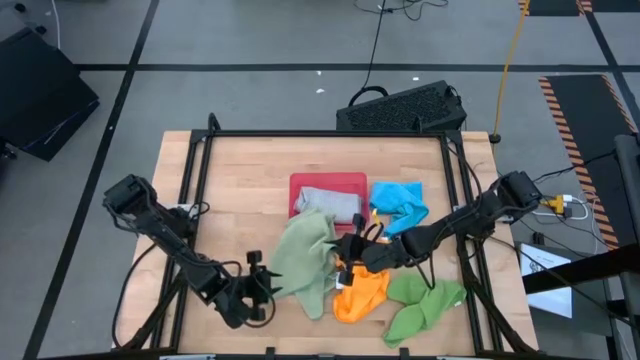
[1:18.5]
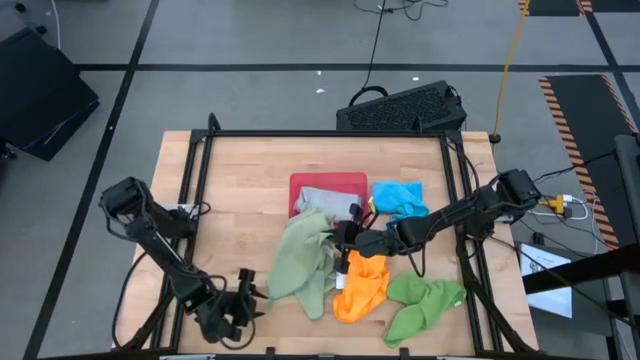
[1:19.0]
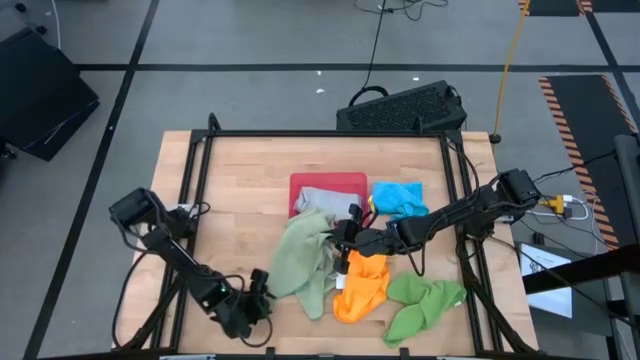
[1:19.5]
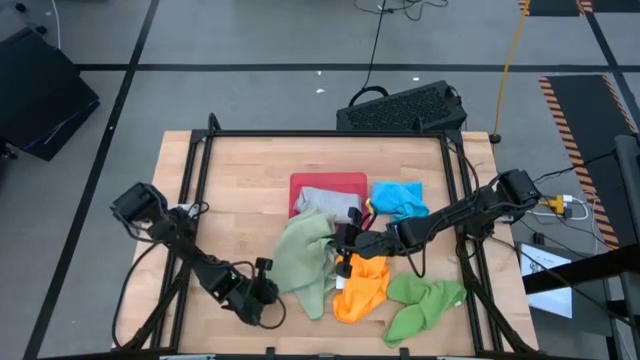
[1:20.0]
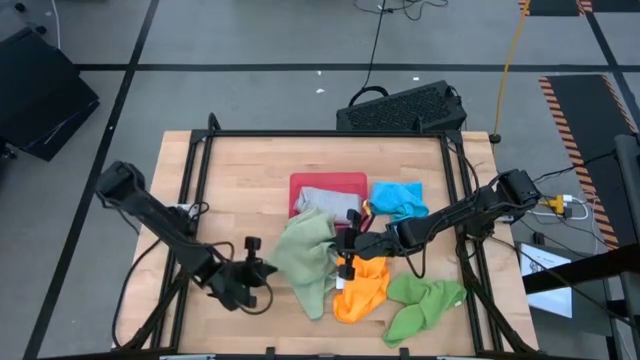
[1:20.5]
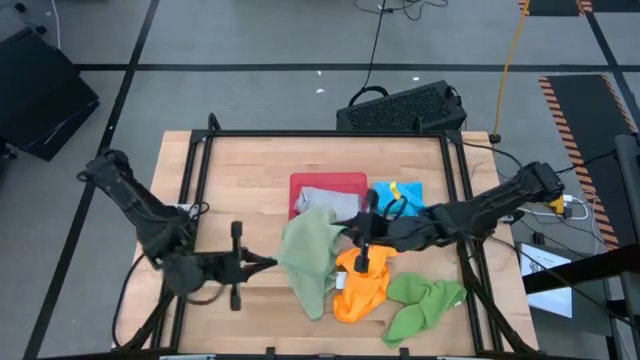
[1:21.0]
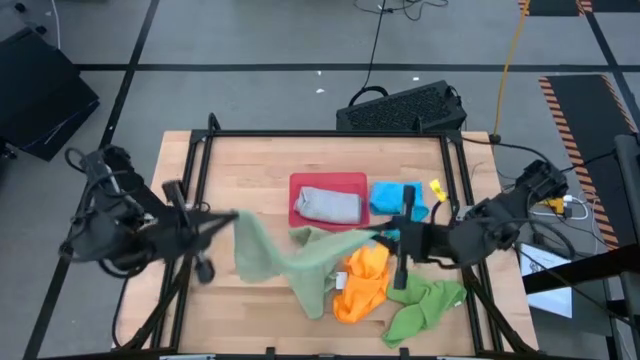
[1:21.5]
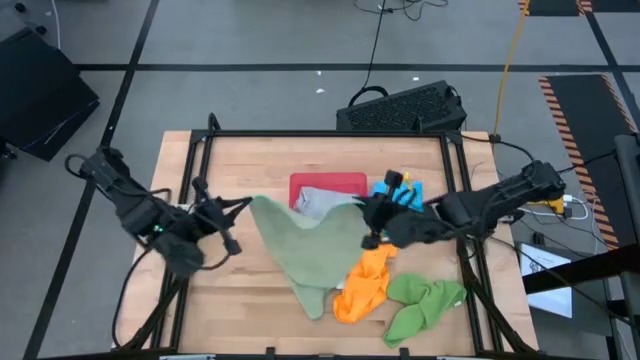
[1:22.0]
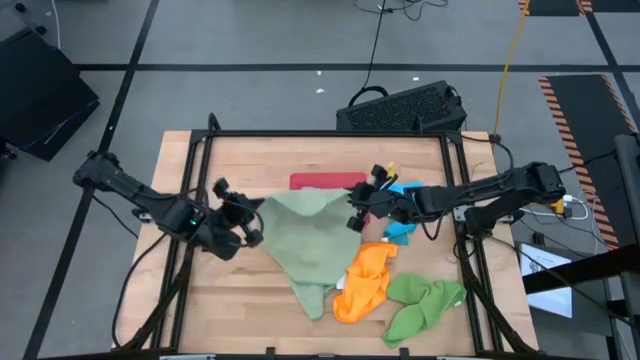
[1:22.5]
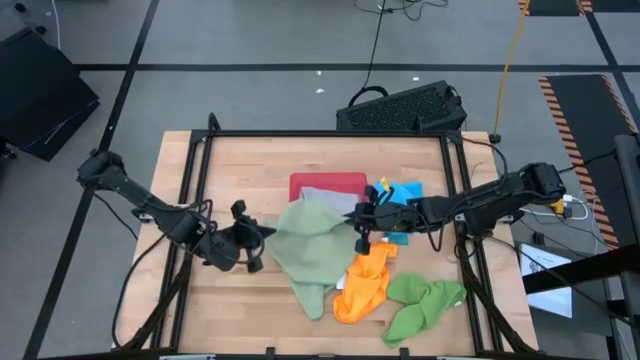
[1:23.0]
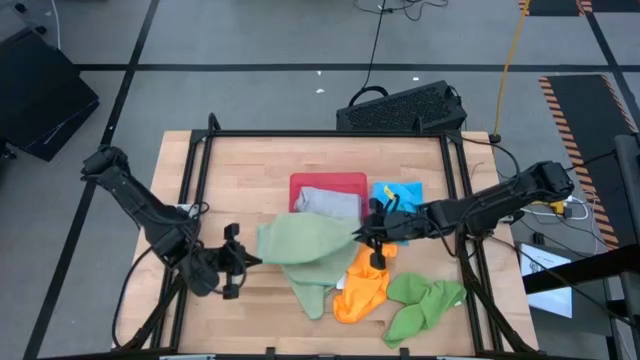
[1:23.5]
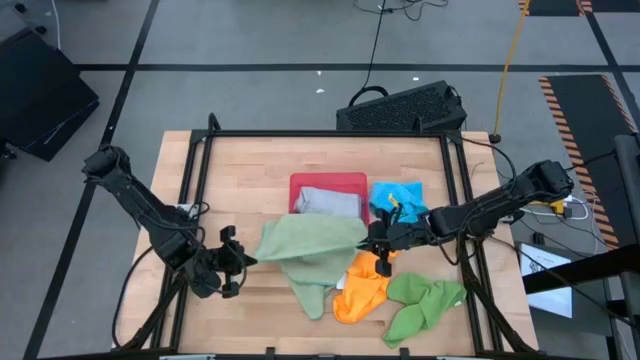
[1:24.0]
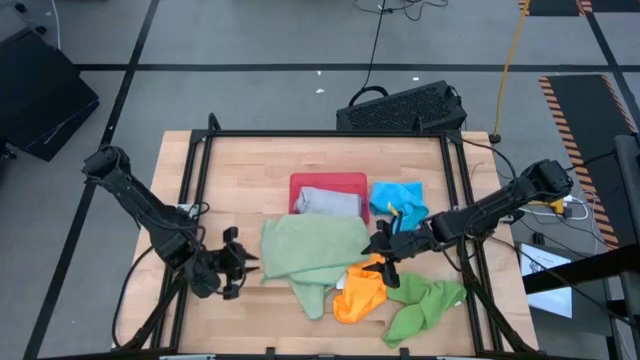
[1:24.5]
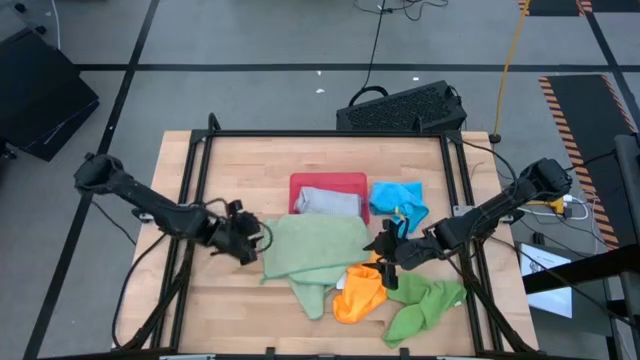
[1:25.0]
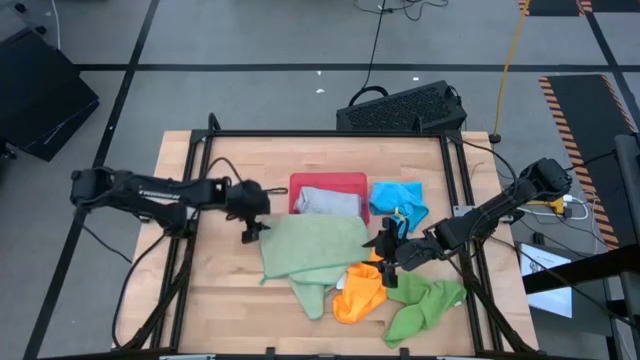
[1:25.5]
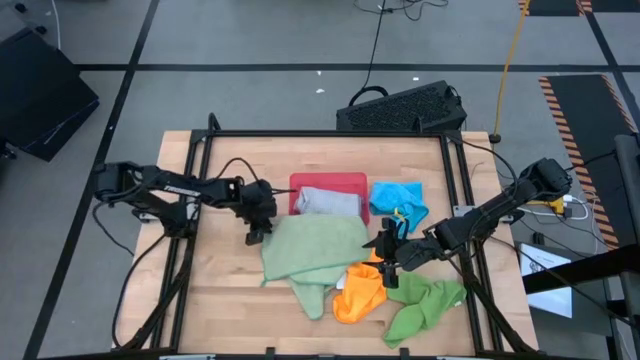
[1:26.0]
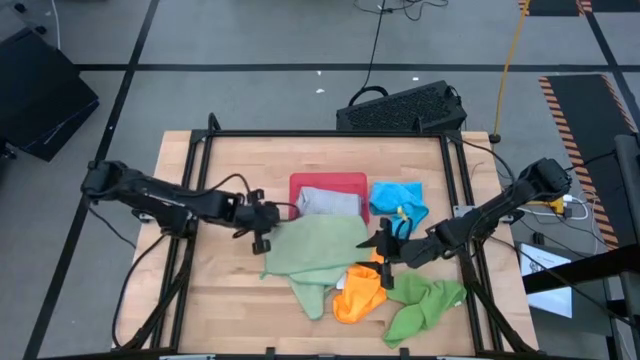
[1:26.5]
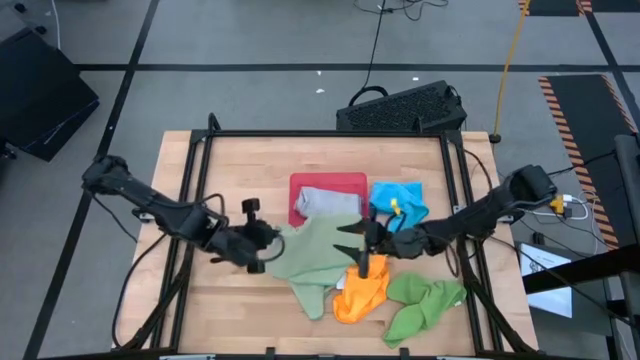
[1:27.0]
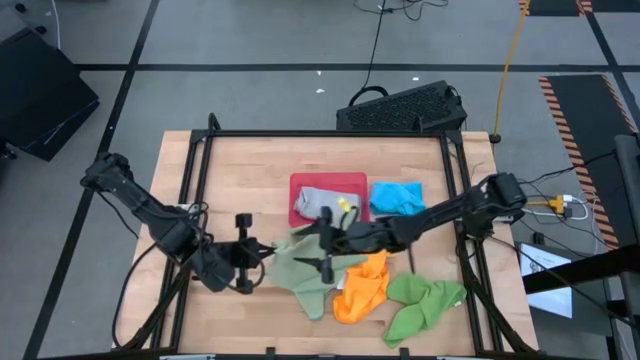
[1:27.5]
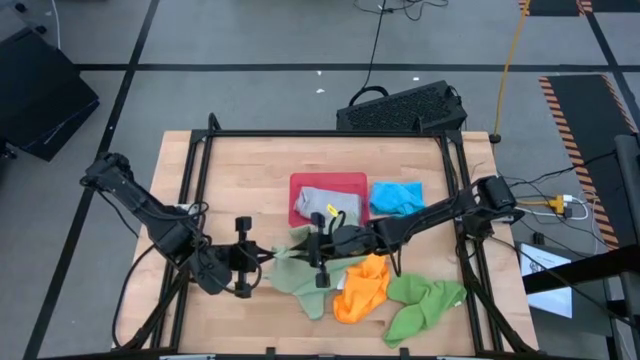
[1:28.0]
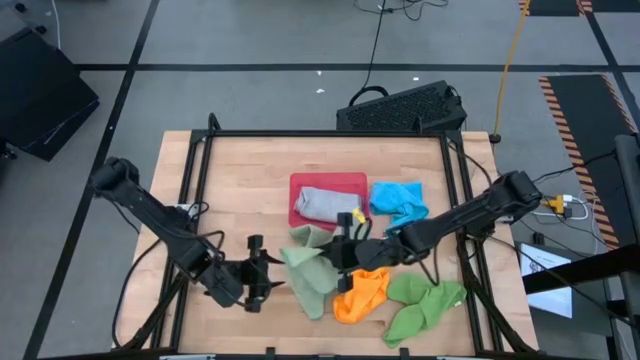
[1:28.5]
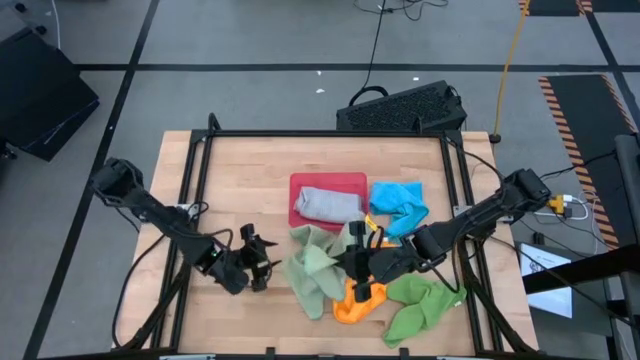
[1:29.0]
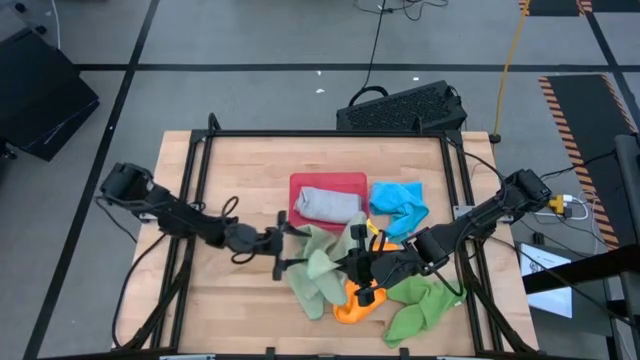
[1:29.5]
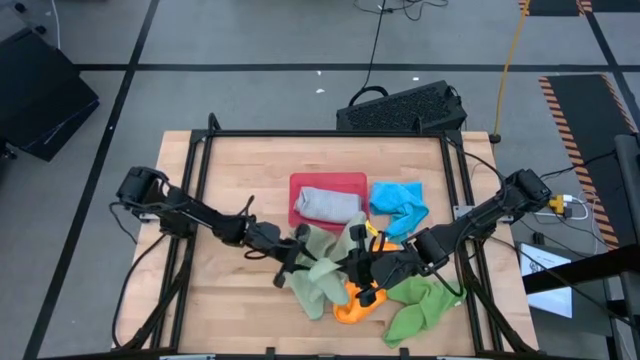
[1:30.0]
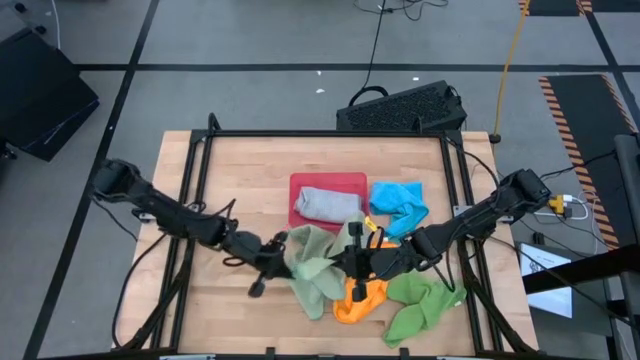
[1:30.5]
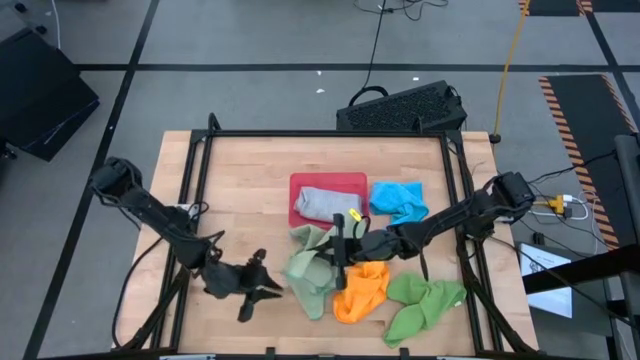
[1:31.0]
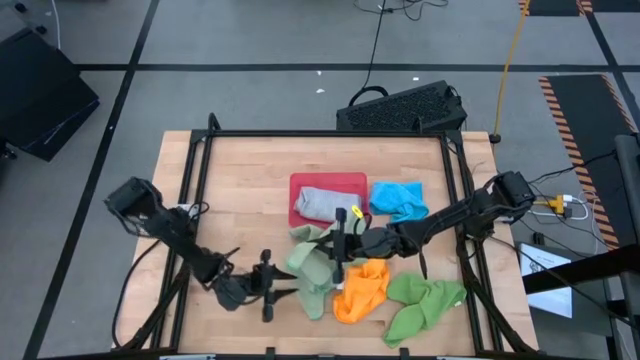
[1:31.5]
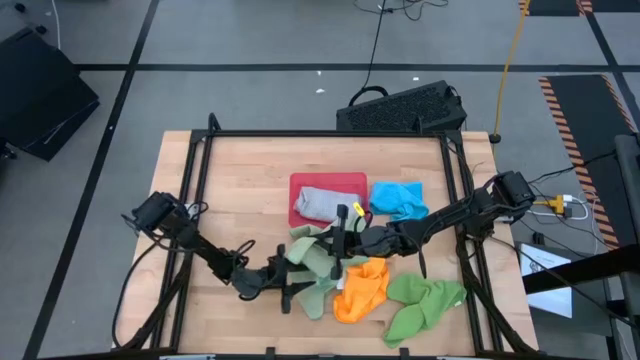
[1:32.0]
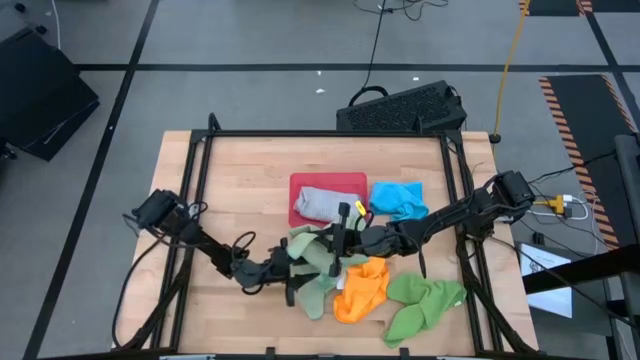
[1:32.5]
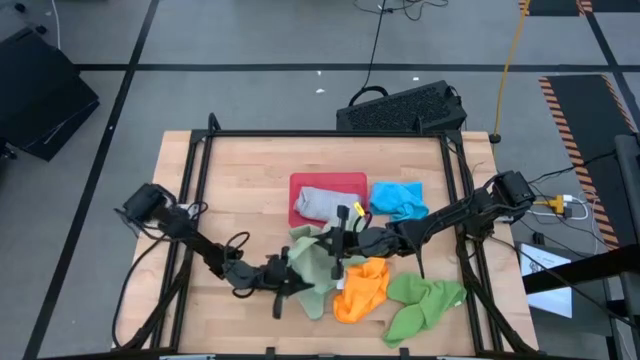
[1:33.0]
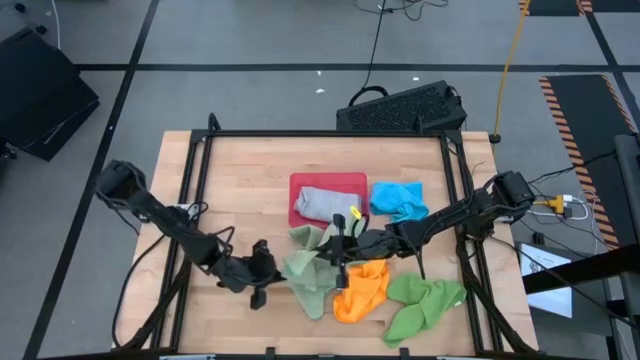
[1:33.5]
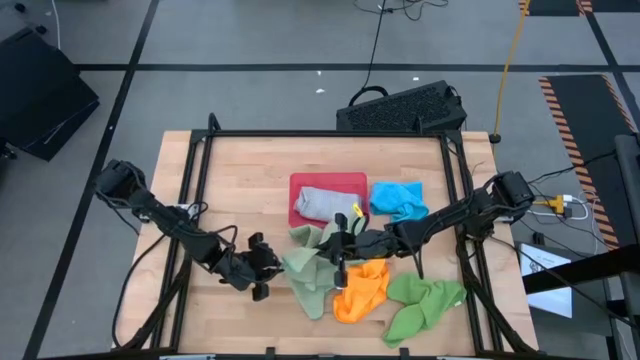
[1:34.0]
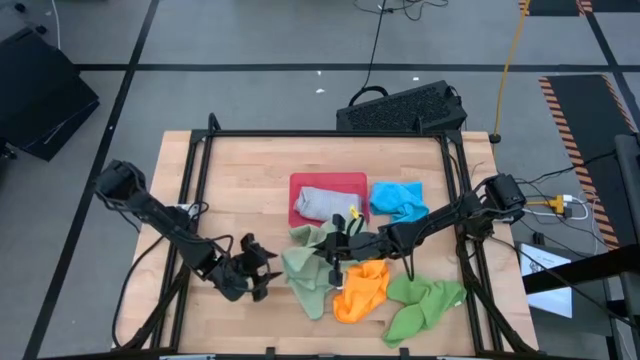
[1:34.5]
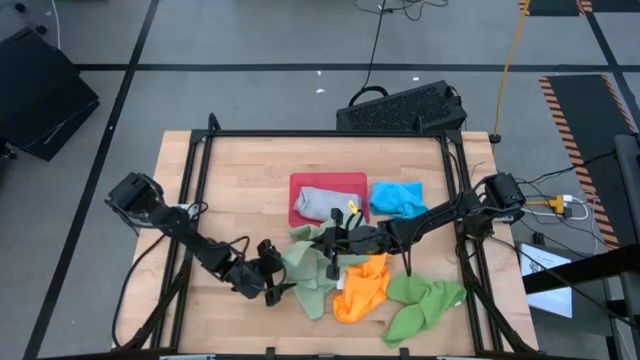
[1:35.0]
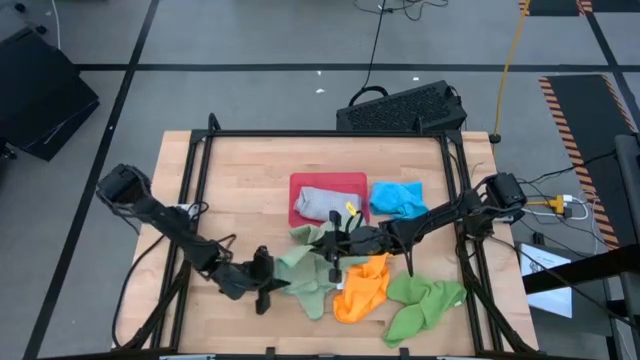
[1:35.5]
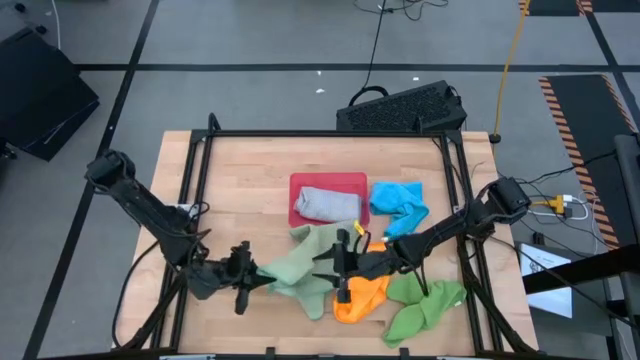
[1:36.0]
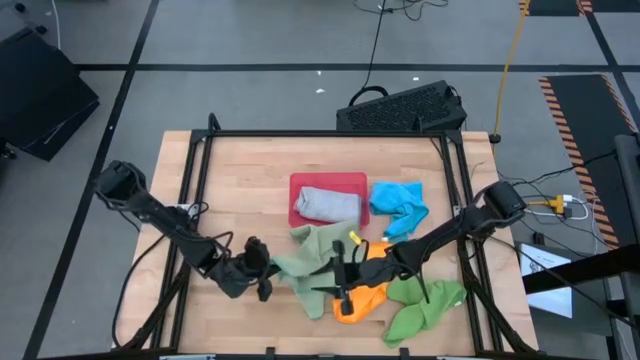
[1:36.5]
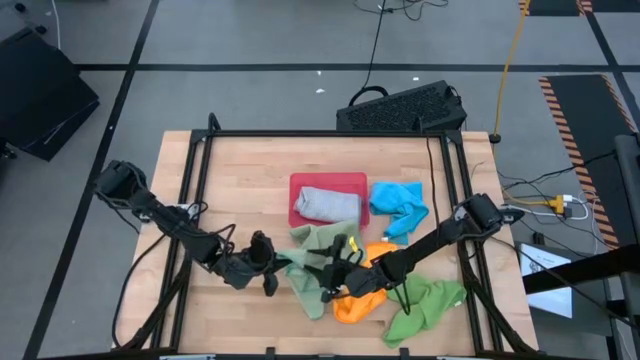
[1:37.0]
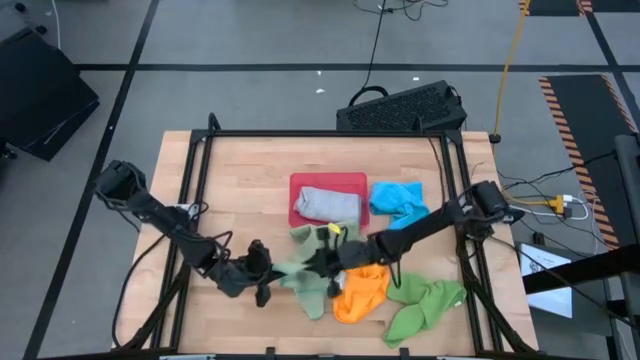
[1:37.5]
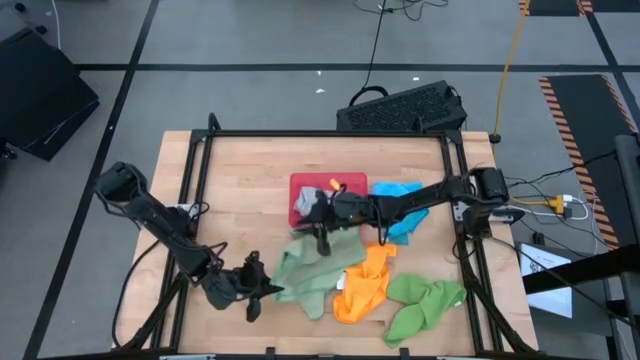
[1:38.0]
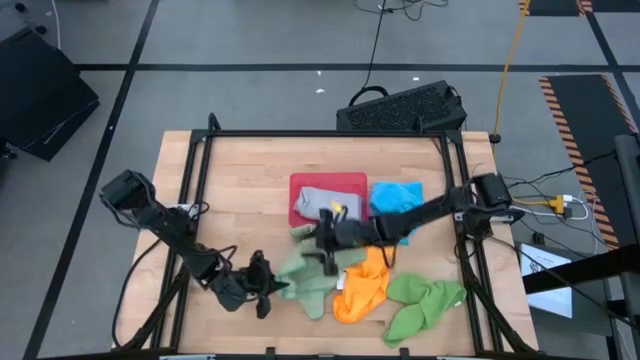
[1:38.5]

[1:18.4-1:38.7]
Task: Fold microfiber towels
Fold the light green microfiber cloth
